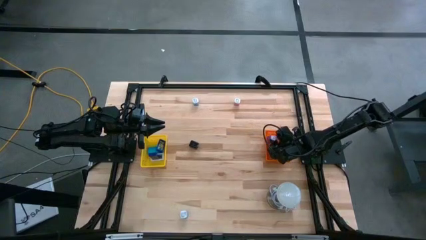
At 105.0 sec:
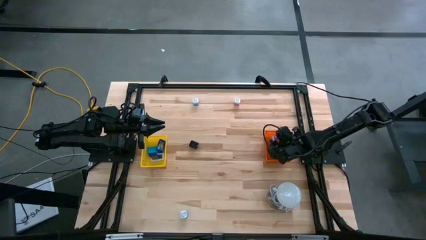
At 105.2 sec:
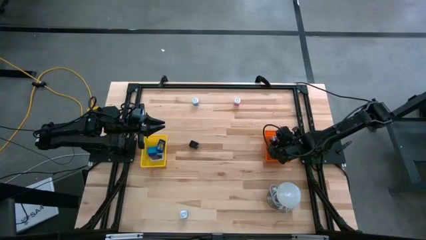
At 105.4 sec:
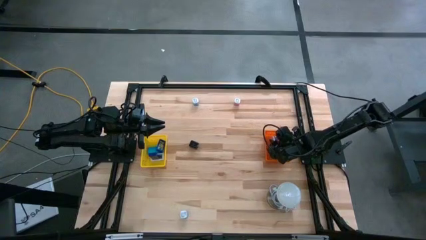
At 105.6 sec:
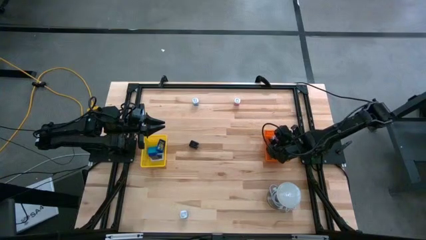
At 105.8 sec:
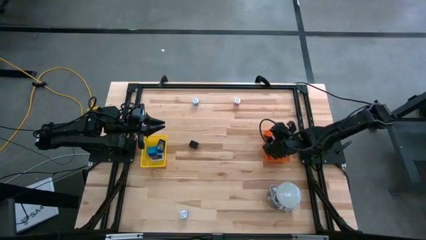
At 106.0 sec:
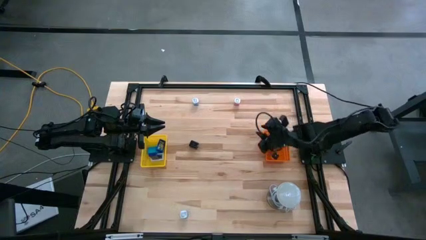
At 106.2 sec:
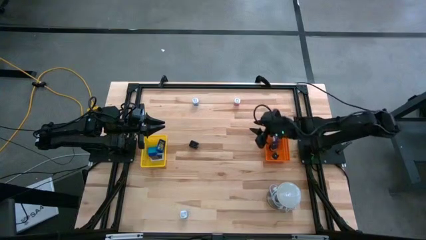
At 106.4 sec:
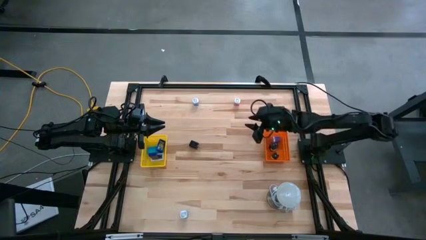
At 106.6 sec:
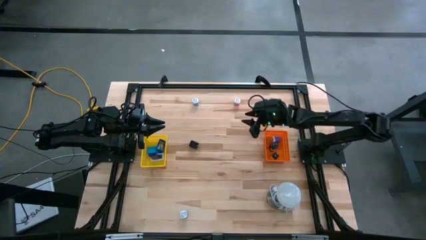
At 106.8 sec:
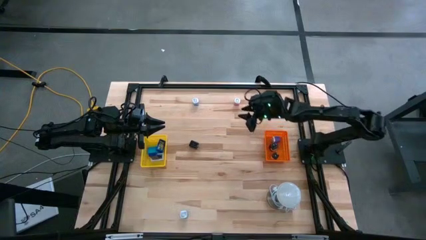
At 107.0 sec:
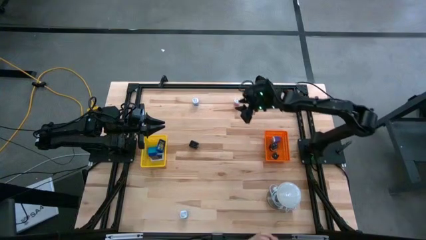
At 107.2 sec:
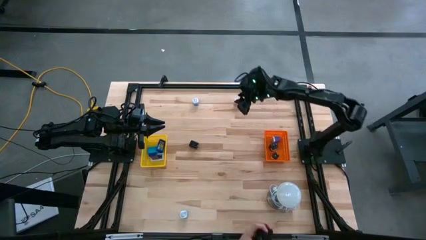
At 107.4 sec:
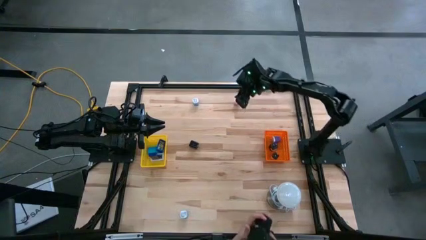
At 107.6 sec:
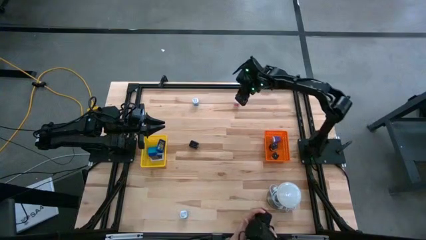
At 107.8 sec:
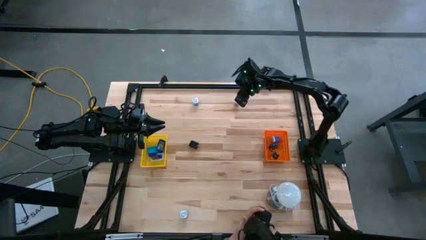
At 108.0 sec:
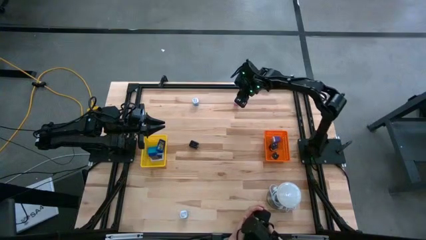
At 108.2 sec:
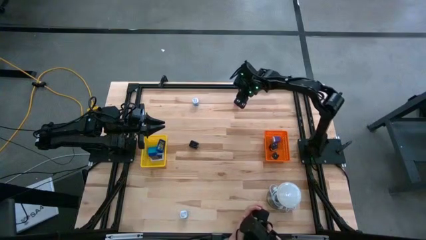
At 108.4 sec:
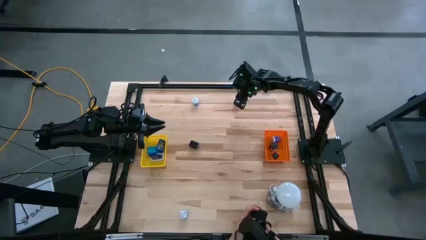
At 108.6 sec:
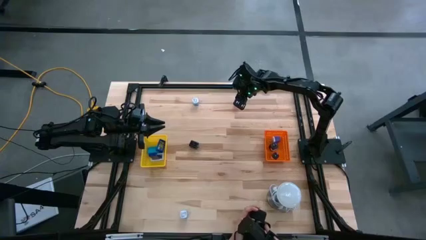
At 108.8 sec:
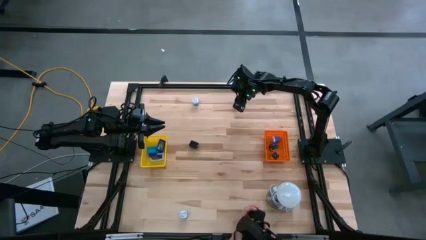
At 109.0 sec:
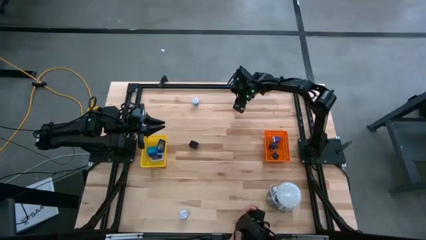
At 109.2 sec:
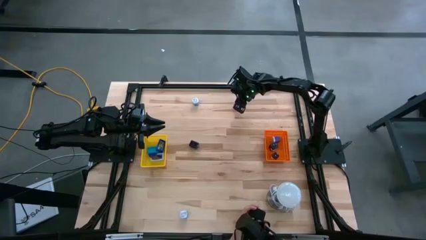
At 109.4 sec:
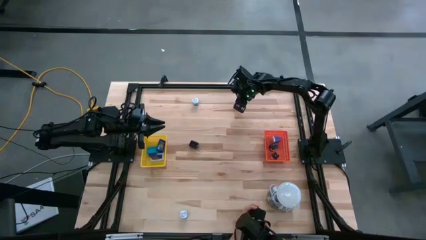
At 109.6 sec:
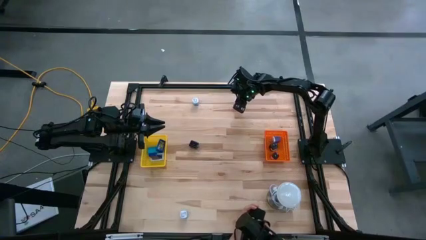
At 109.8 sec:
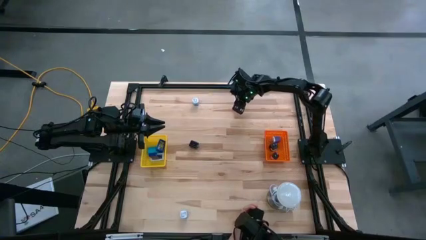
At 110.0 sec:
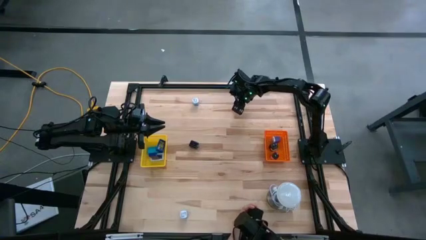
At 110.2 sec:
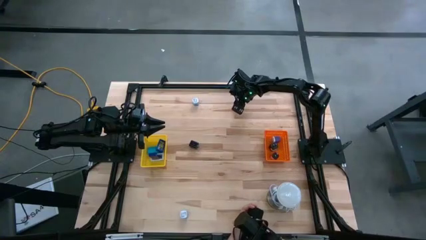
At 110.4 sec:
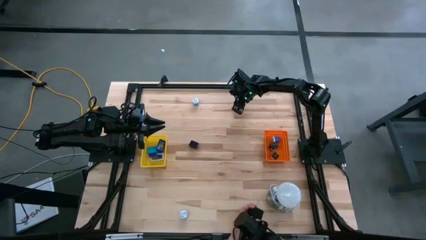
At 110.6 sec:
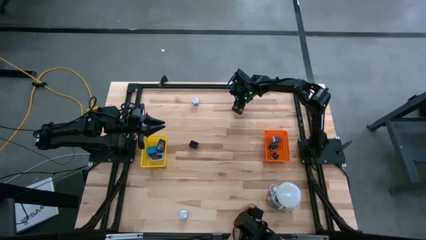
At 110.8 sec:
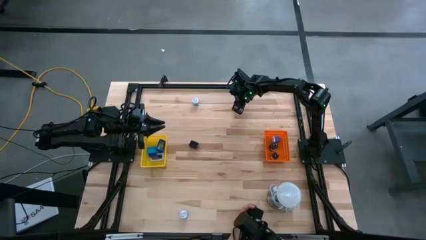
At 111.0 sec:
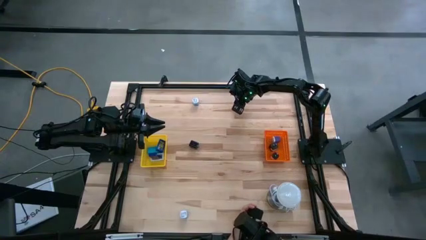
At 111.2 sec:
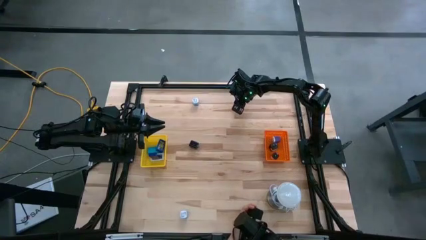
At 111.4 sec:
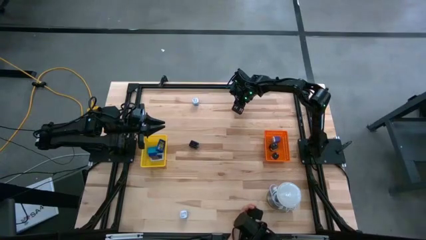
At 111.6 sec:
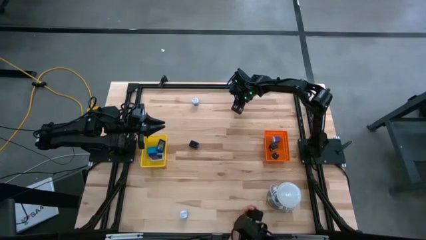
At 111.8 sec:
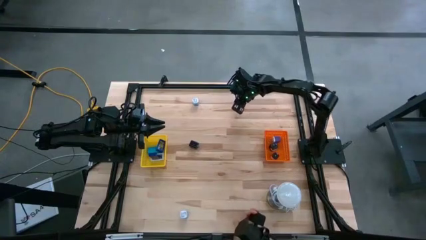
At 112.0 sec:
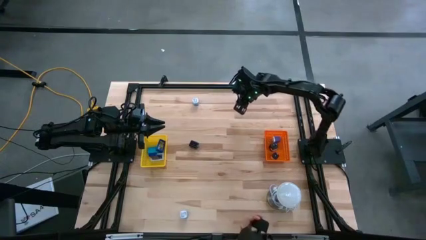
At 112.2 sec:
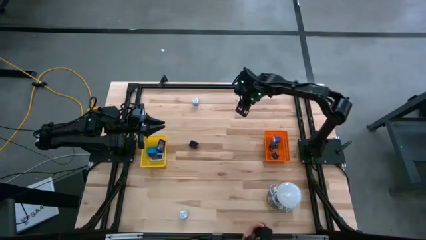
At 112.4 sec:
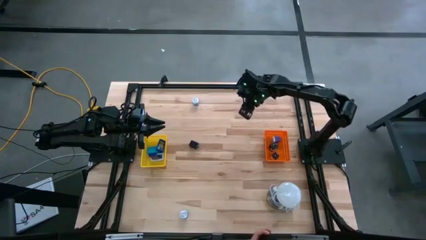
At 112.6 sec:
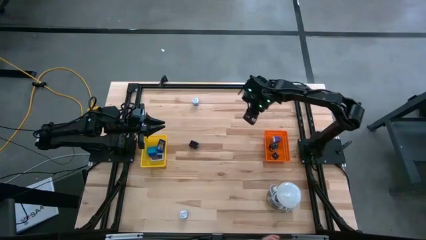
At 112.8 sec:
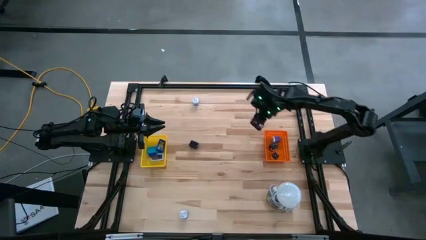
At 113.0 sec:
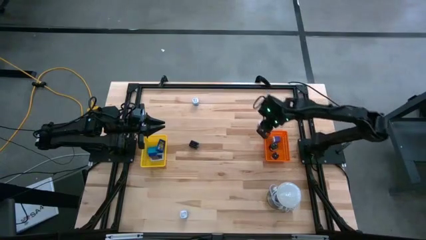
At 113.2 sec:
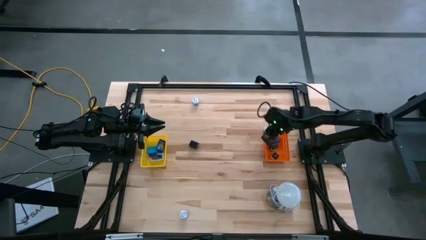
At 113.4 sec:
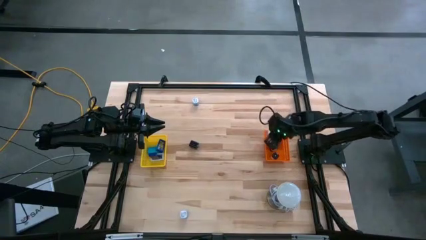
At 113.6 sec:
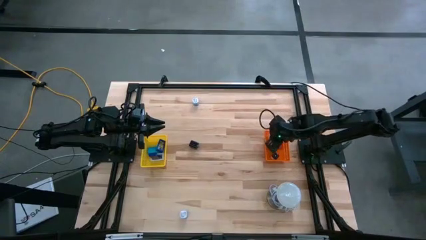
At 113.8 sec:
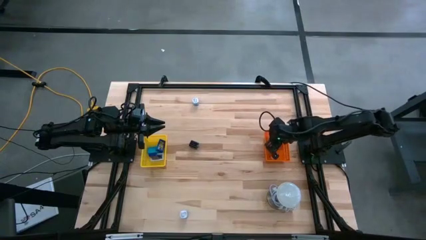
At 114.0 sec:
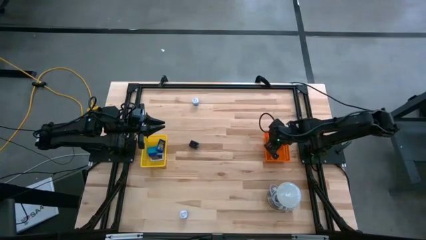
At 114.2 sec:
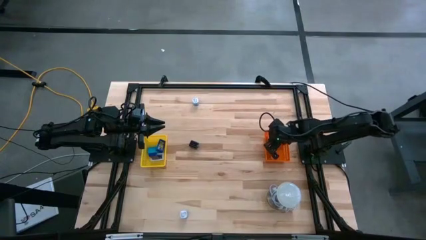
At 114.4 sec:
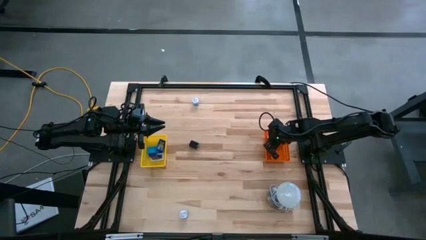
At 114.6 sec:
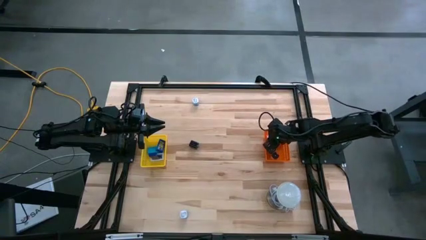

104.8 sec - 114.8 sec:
Task: Pick & Place Office items
Put the pink white charger adapter into the orange bin

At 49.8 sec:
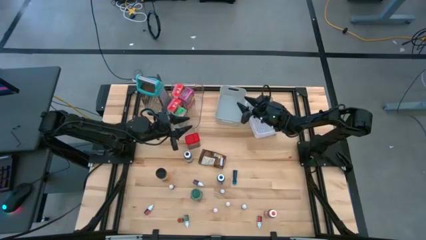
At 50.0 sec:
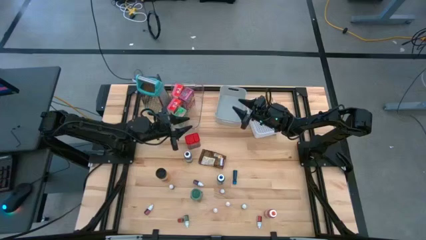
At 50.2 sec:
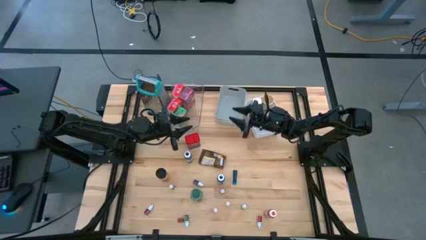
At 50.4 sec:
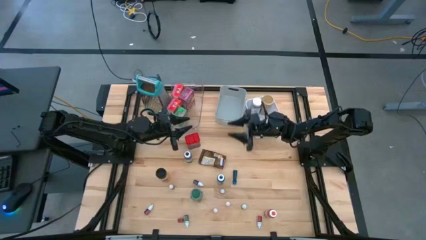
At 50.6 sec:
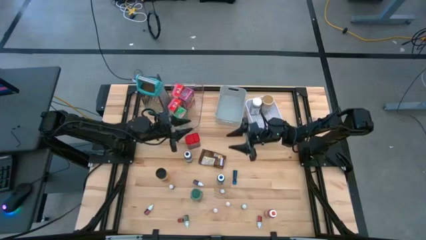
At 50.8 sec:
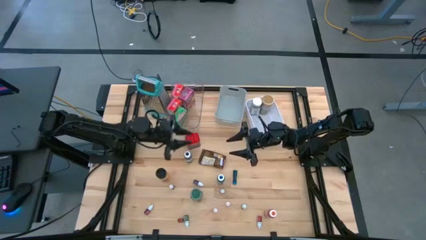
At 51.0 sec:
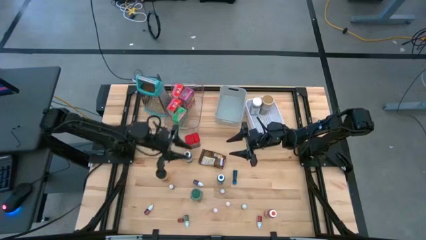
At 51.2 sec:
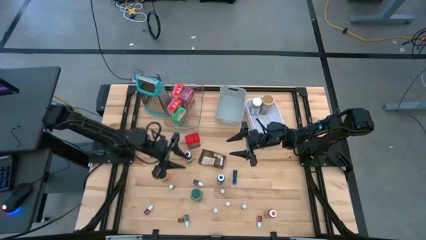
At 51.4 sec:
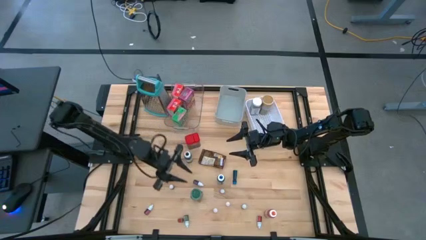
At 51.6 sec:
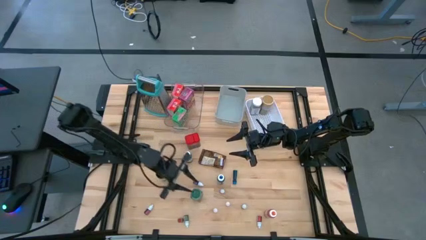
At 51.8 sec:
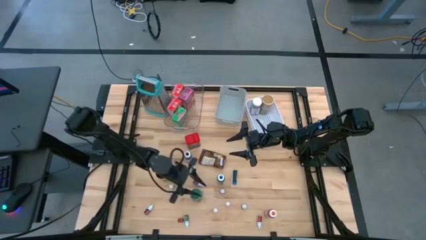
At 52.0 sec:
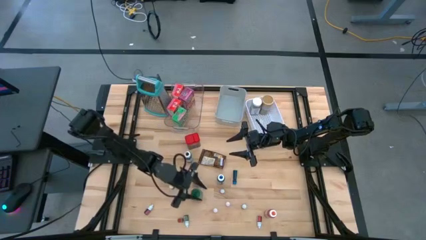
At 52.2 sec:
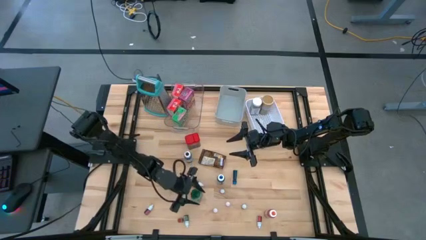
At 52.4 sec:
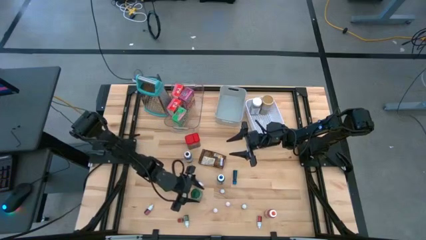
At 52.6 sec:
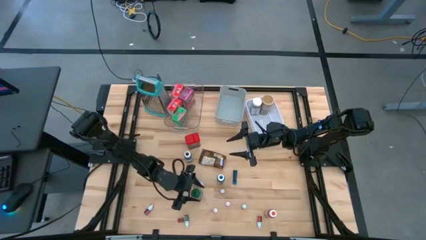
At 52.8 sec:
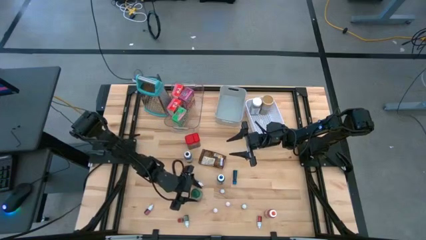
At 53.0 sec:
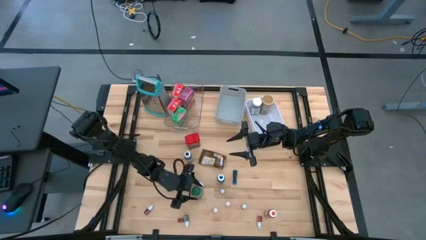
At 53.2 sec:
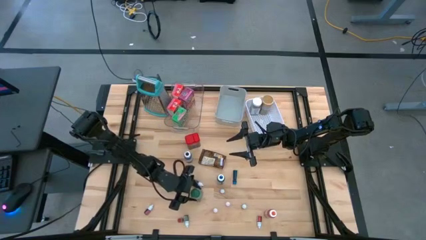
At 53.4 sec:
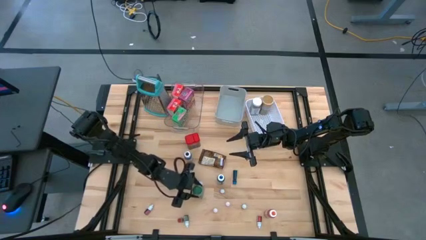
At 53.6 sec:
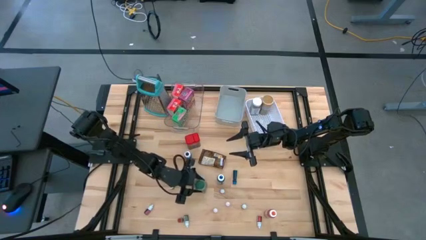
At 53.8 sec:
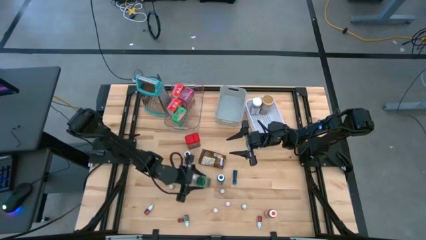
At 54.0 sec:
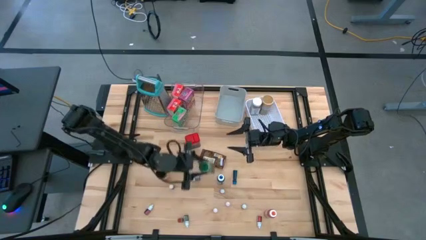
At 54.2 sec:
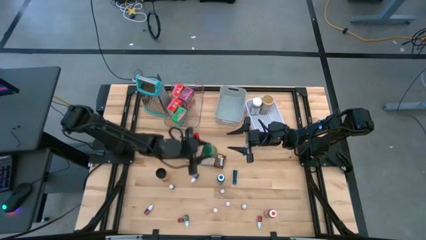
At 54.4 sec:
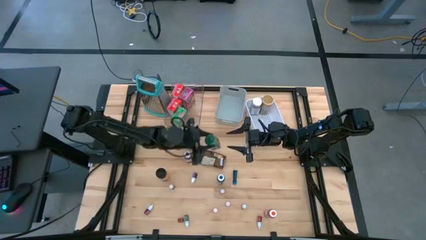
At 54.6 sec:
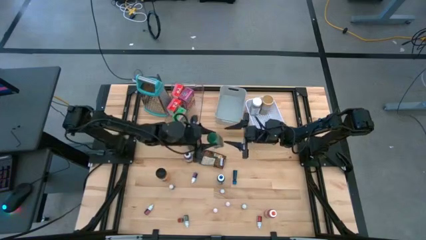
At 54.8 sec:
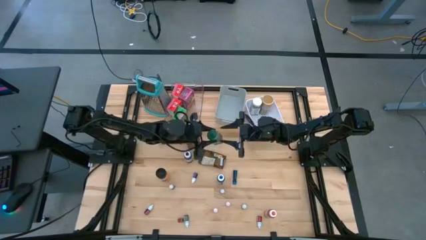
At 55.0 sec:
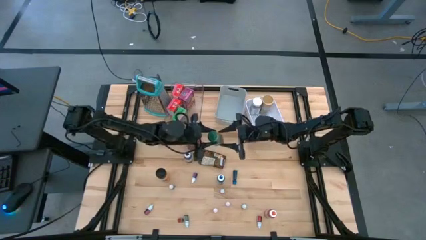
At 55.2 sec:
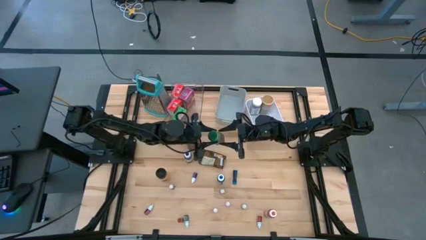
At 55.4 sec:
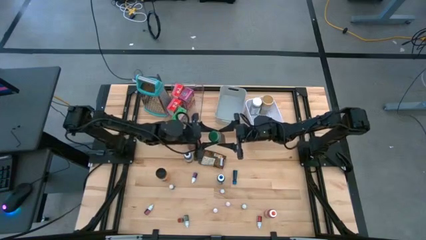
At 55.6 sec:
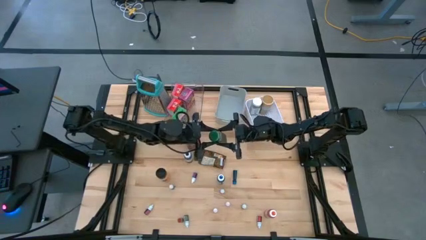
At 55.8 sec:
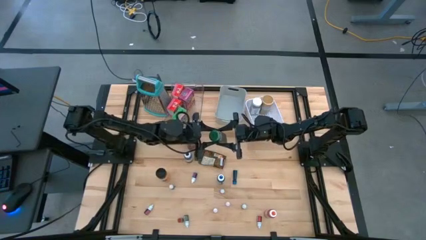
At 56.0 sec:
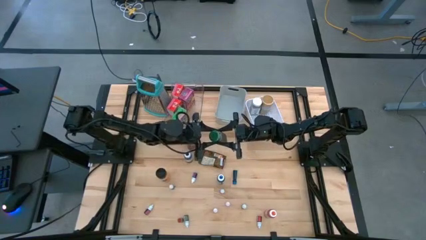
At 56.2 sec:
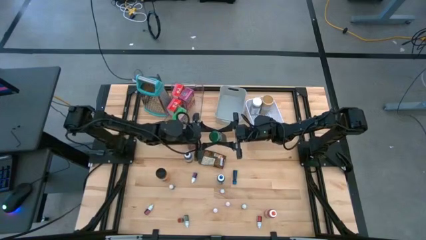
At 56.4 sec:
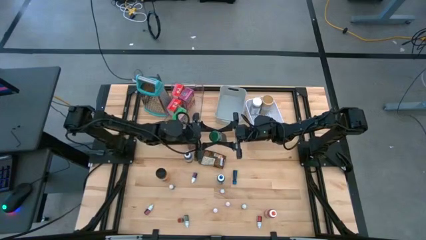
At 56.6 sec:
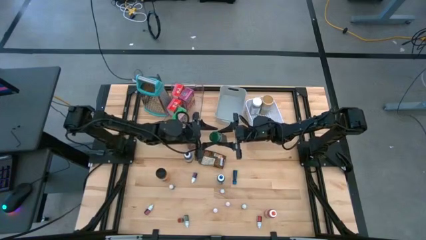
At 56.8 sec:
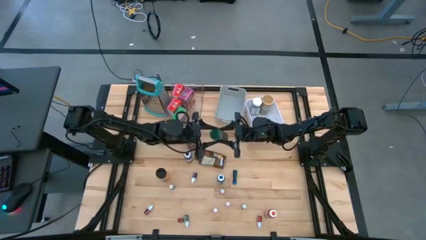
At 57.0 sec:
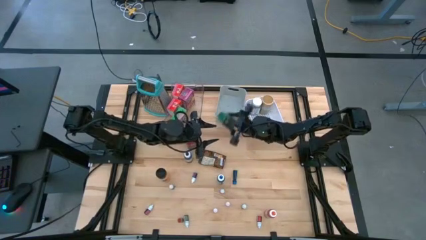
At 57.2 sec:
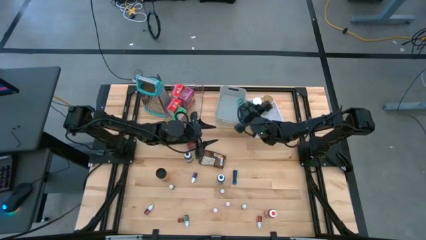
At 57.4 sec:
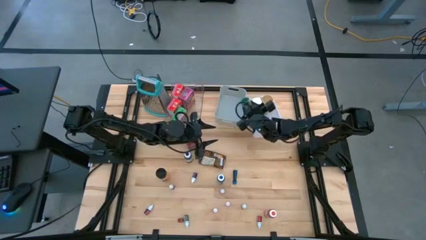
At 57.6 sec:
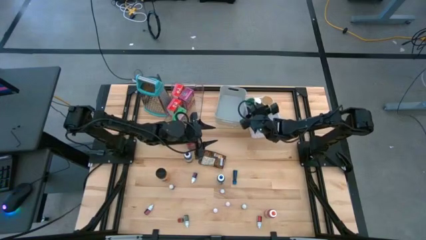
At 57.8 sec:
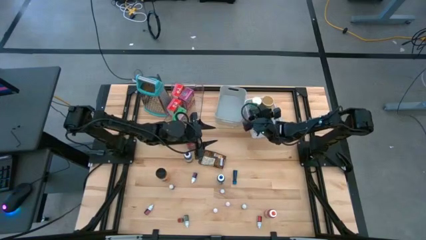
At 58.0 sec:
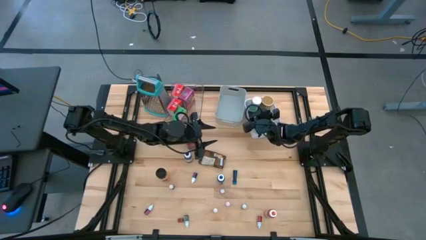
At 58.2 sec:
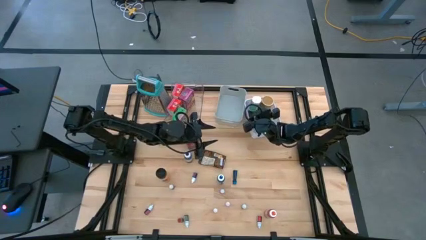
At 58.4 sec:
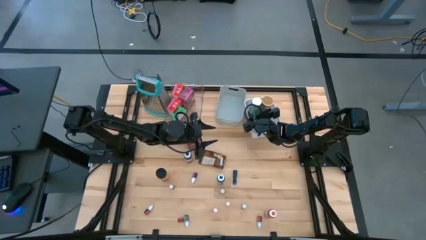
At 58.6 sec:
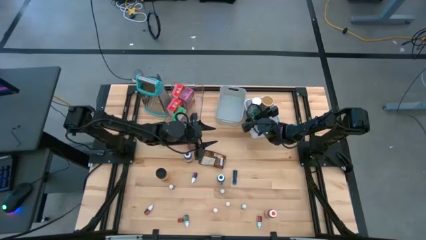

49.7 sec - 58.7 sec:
Task: Pick & Place Kitchen Items
Put the green spice bottle into the white bin
